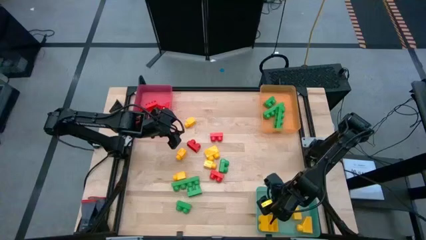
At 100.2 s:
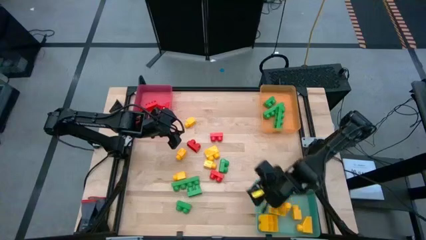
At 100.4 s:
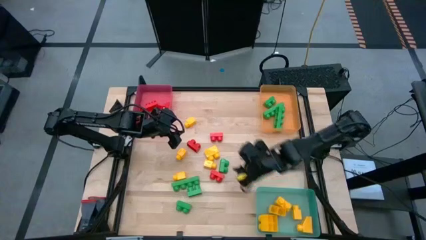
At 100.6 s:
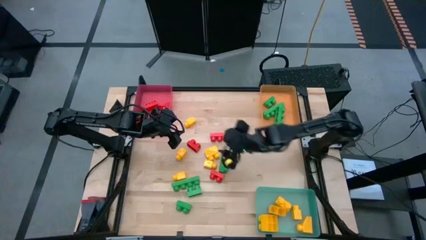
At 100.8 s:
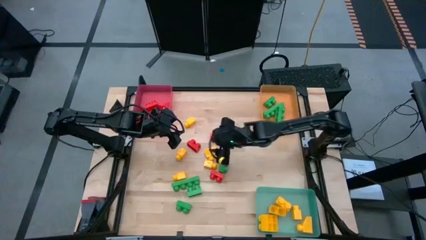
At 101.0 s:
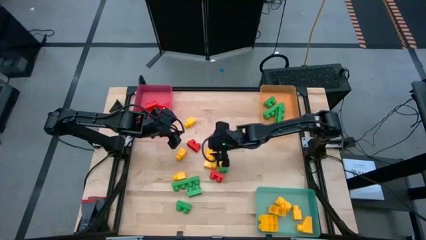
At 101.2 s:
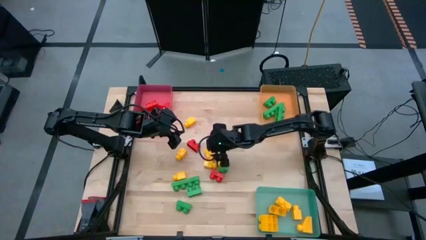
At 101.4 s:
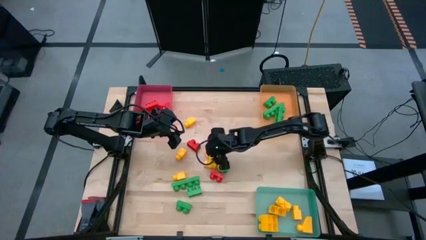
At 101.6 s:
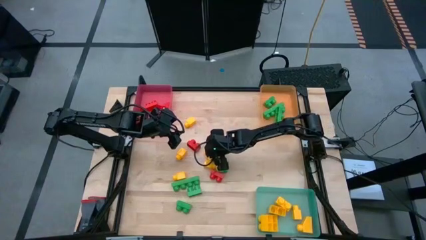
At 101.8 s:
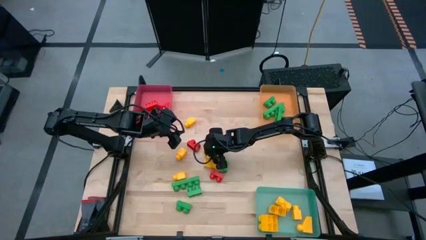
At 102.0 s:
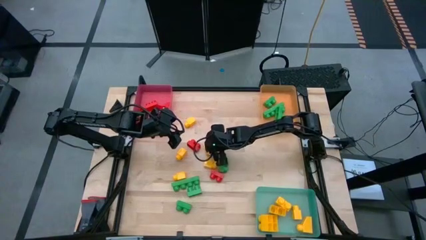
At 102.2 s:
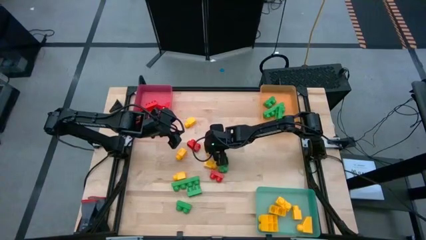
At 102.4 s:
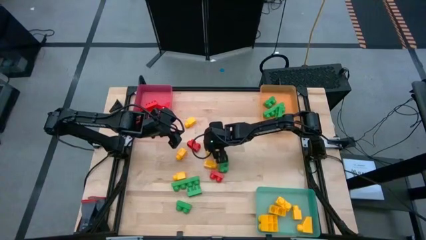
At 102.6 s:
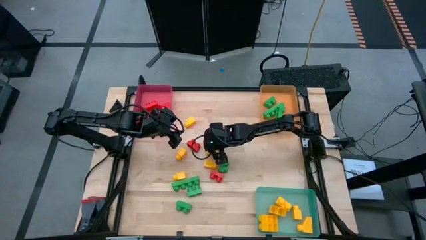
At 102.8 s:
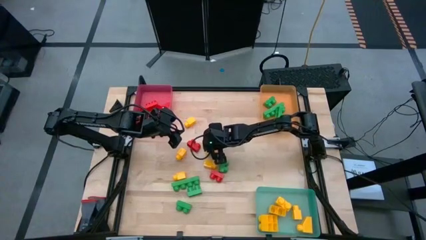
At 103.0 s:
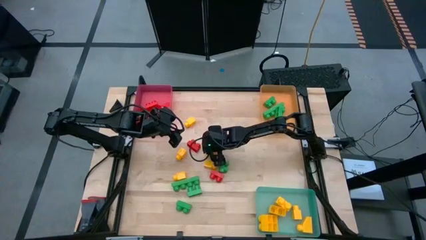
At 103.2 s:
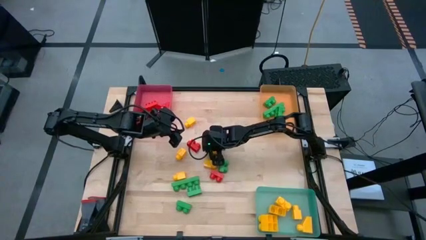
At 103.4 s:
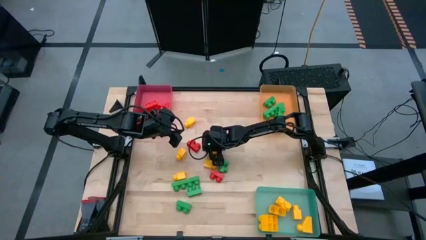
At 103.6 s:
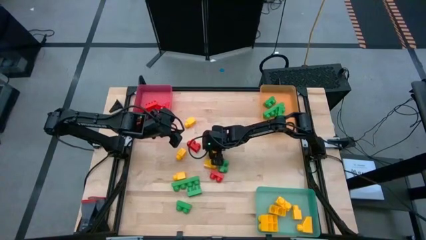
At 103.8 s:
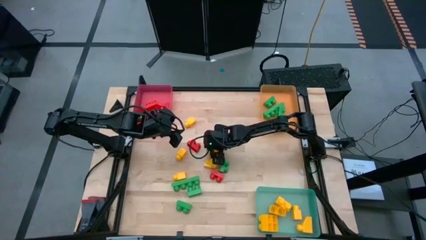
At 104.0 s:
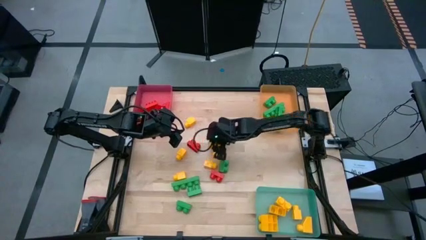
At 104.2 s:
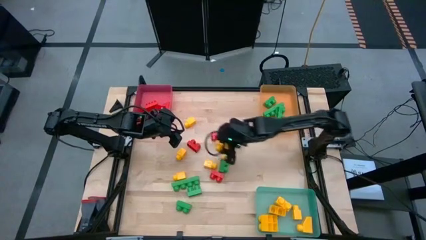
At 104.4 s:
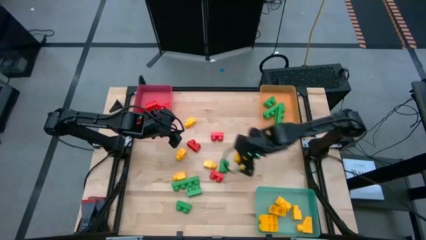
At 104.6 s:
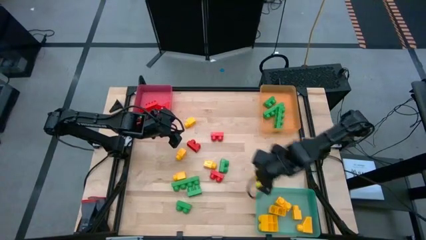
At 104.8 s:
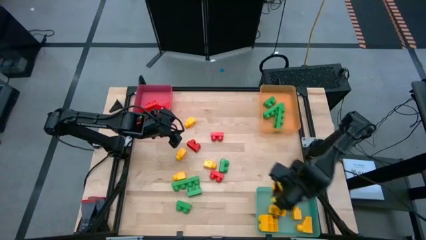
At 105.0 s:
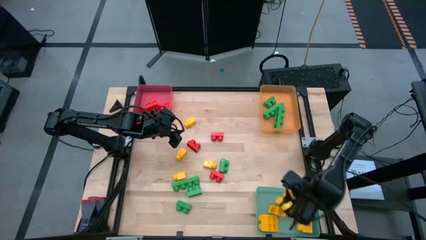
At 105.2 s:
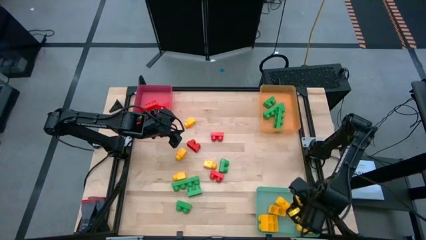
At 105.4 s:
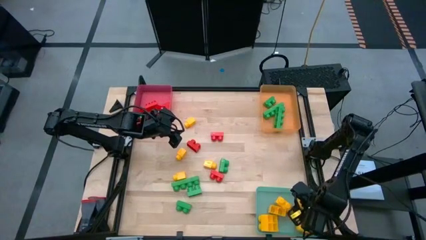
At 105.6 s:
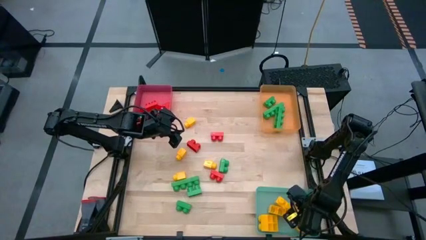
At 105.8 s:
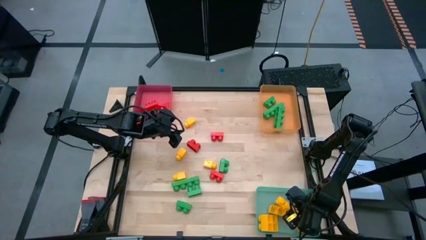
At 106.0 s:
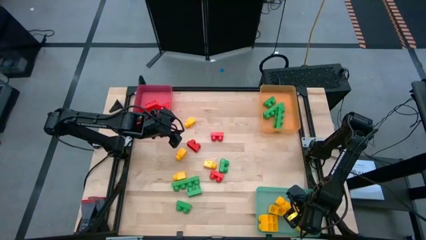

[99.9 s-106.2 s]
Task: Sort blocks
Put the yellow game piece into the blue bin

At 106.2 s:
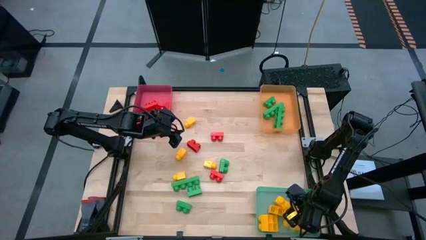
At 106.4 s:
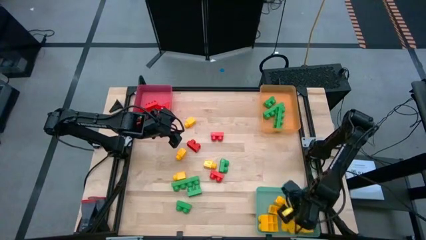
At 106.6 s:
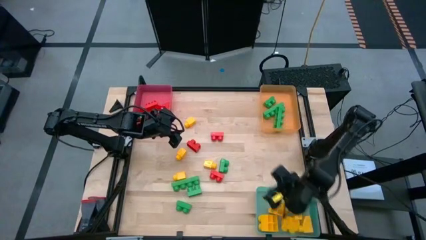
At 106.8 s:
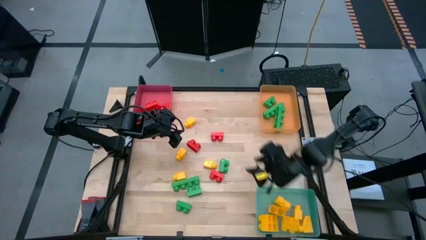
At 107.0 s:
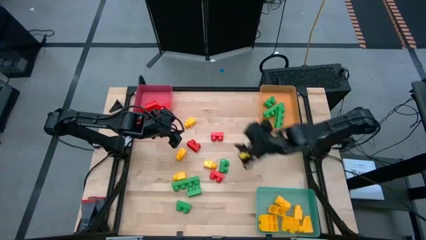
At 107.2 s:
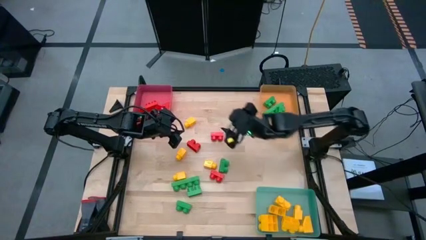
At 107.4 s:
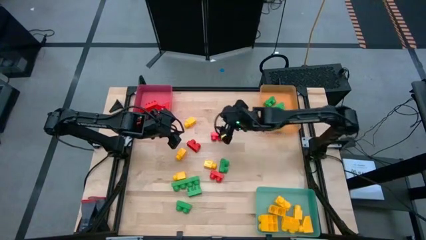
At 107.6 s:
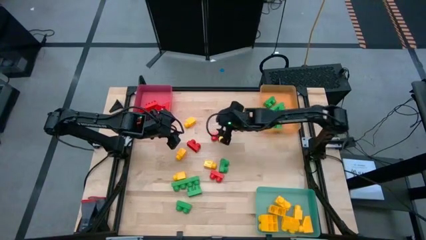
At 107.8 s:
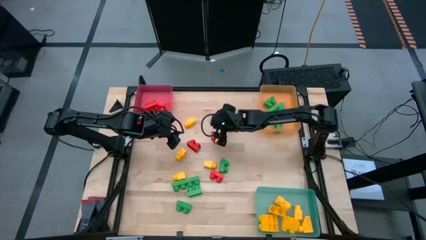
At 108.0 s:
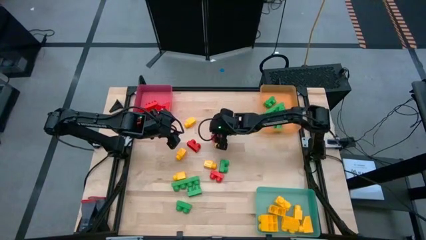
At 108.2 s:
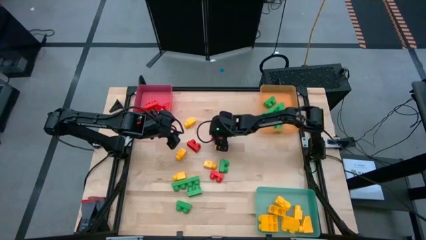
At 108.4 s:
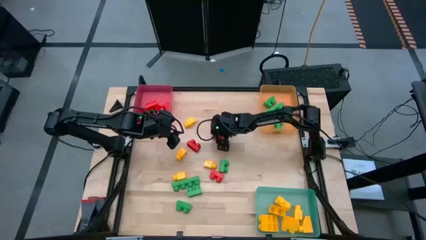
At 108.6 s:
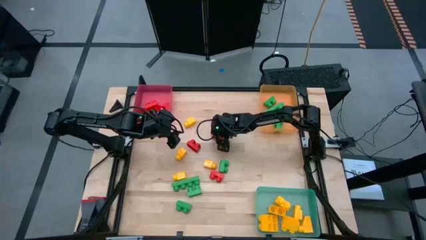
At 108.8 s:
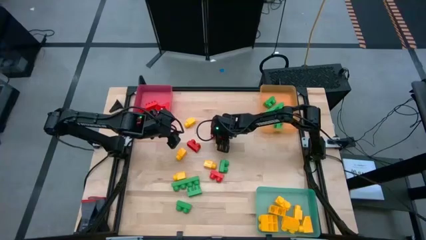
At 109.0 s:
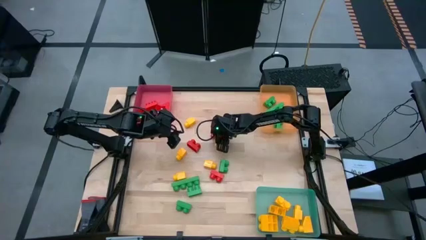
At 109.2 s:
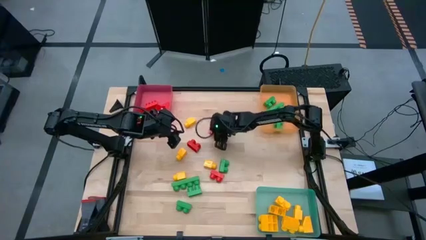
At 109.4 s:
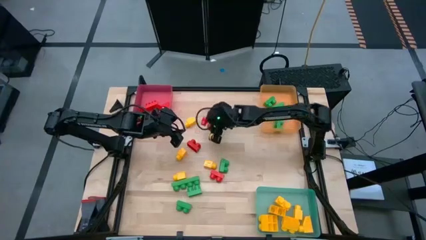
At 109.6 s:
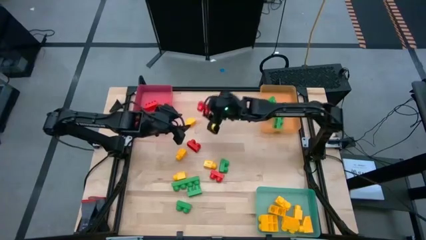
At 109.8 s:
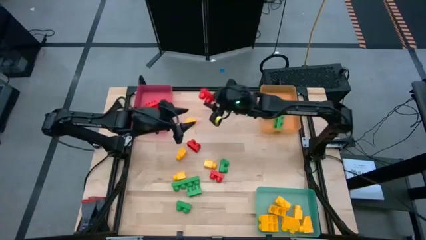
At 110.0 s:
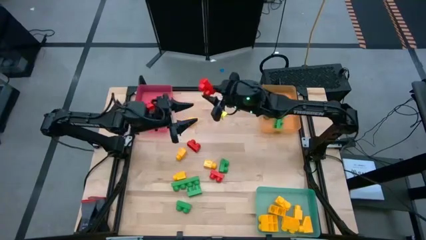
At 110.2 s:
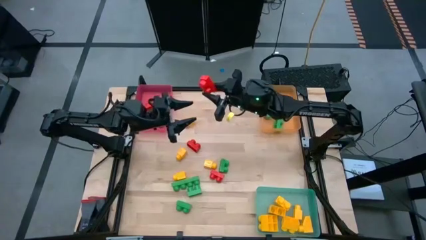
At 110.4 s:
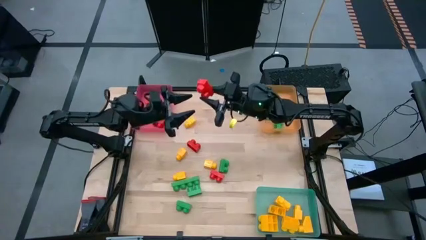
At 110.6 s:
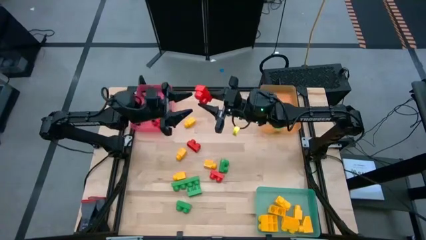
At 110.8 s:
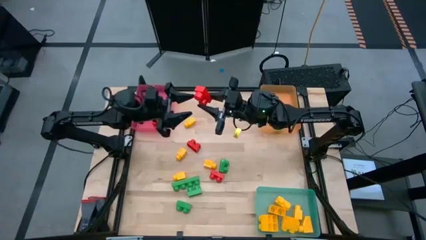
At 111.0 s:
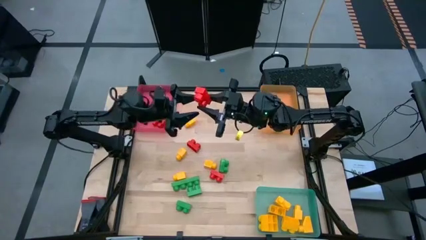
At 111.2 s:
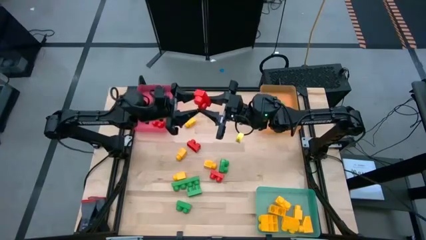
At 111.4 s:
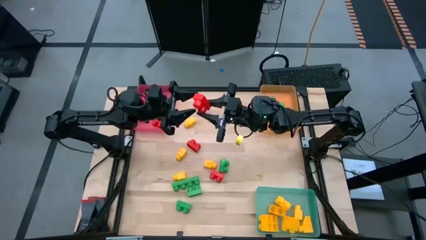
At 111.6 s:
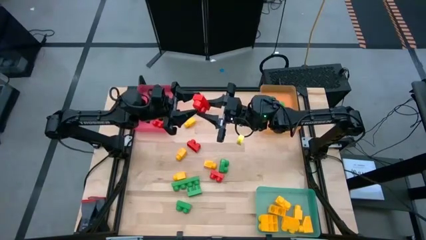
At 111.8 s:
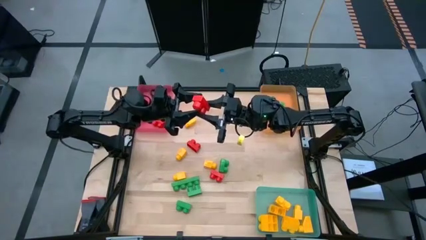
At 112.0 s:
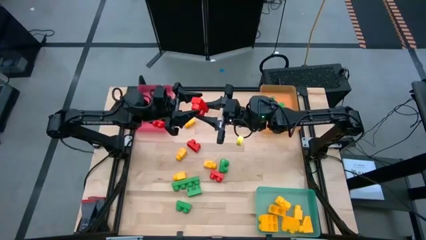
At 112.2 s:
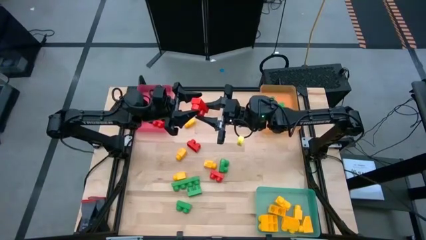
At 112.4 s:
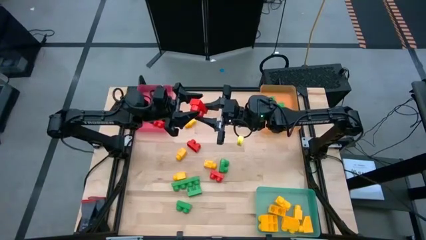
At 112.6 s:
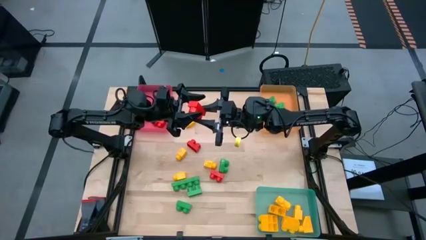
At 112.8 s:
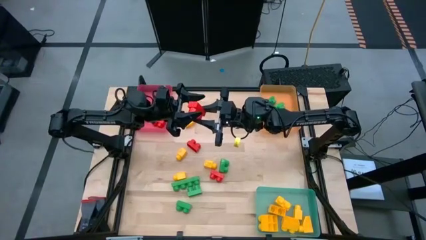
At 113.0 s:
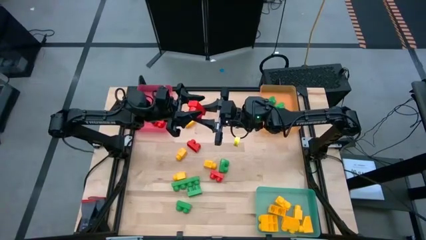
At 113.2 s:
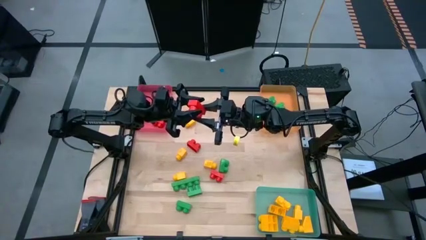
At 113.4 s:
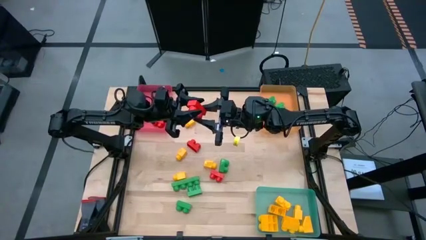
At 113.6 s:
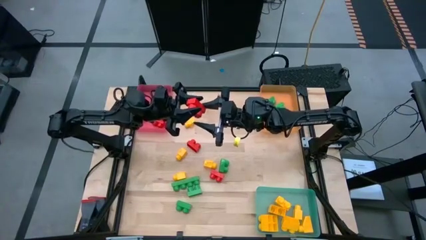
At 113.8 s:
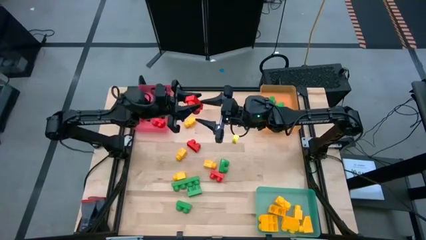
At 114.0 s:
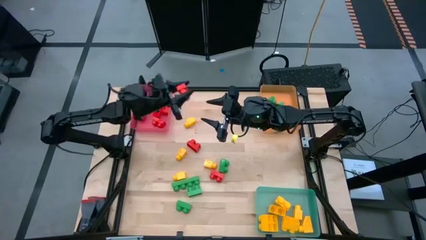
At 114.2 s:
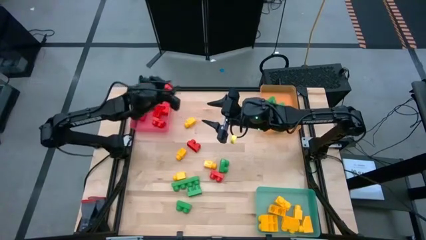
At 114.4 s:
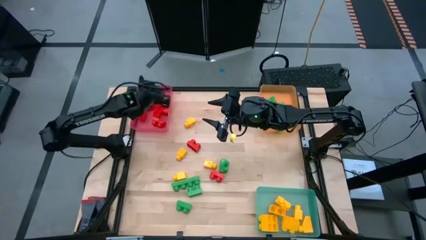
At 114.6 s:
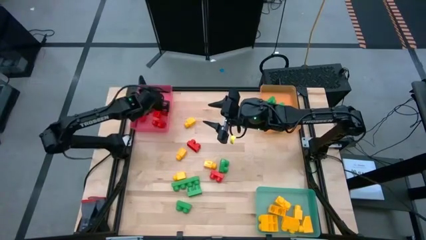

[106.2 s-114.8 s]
Put the red game piece into the red bin

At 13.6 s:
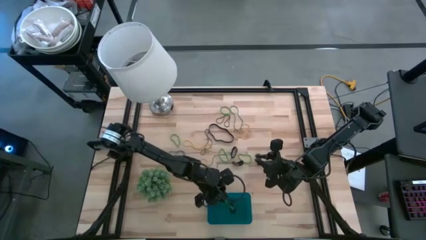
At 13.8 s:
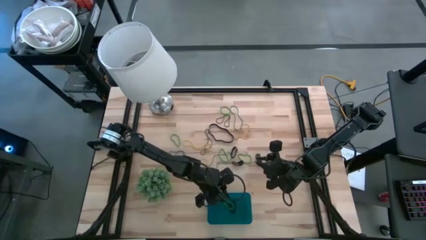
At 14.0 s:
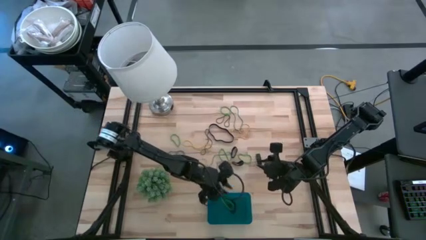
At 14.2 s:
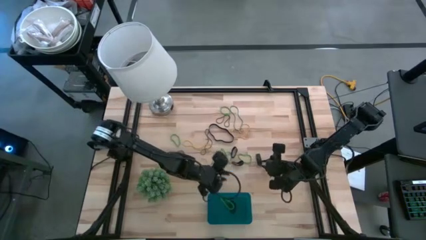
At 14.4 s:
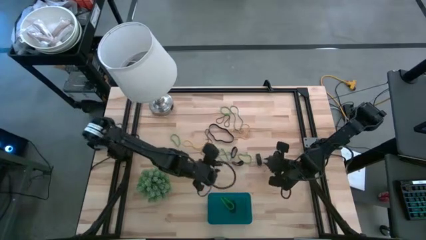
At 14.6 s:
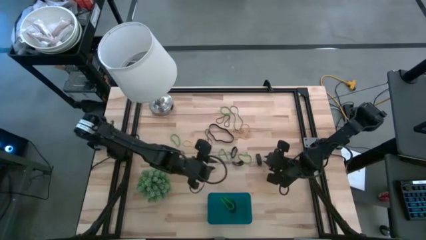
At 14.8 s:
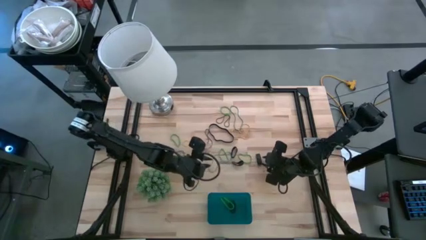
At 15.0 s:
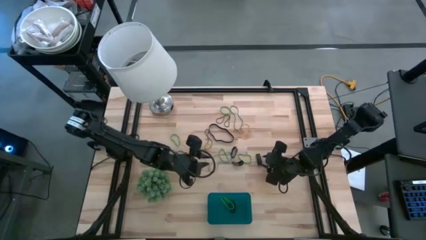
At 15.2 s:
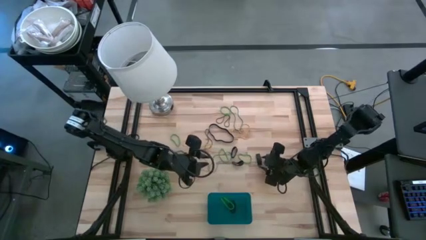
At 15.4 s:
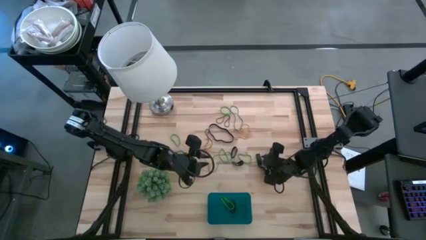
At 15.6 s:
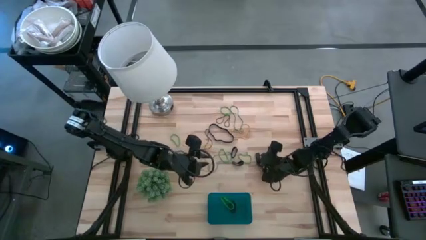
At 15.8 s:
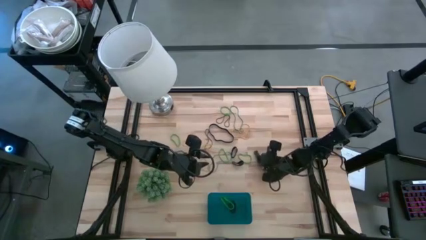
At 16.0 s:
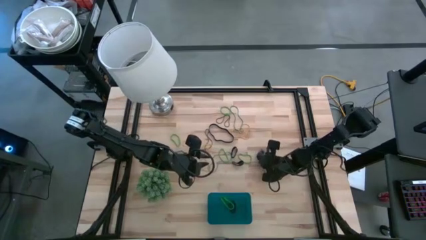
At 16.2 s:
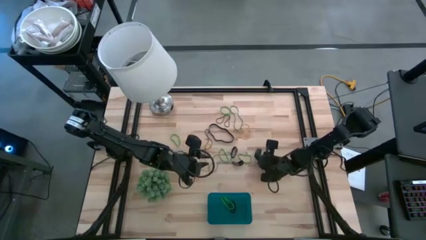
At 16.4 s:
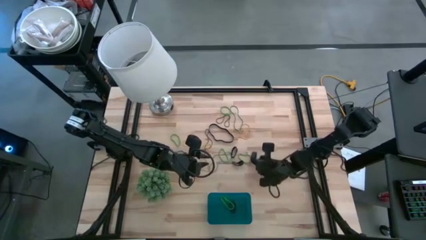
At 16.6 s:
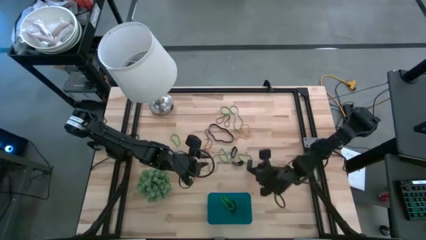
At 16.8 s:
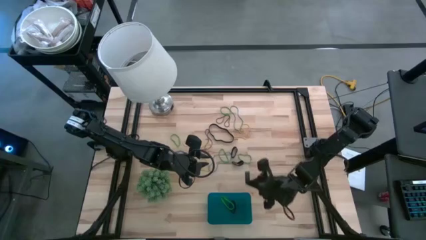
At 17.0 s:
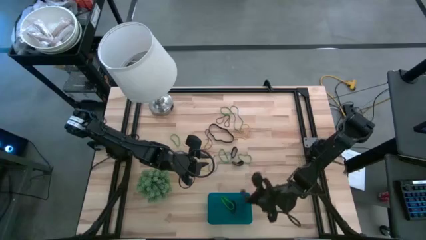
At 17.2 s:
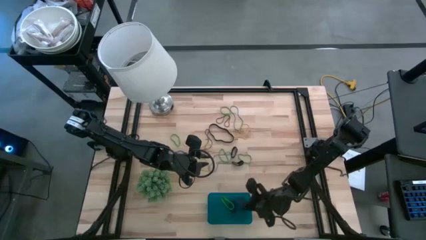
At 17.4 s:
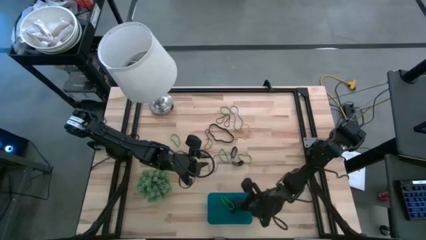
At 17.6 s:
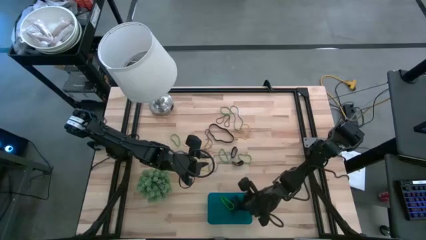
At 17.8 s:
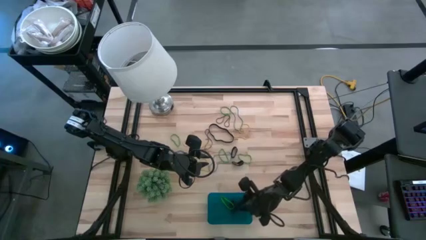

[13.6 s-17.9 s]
Task: Pick and place rubber bands into bin
Put the black rubber band into the blue bin
